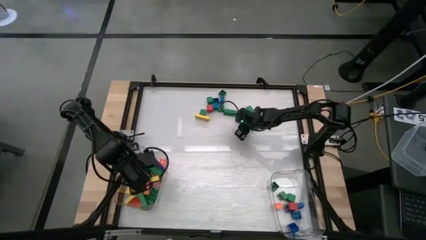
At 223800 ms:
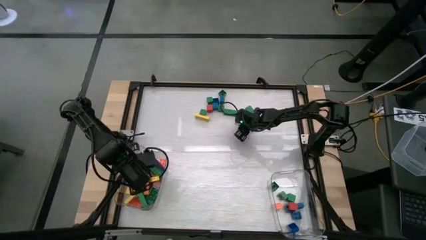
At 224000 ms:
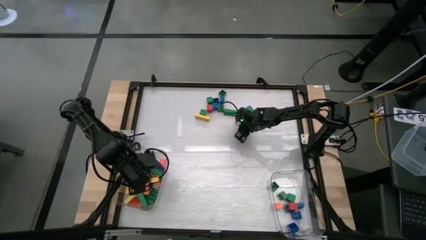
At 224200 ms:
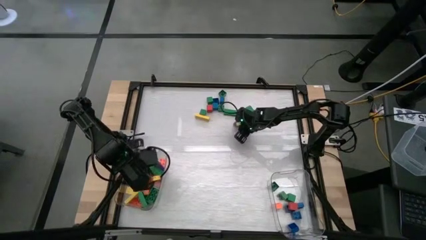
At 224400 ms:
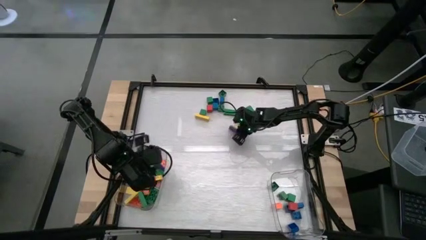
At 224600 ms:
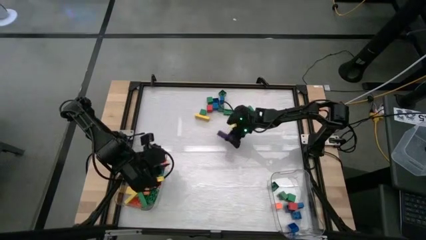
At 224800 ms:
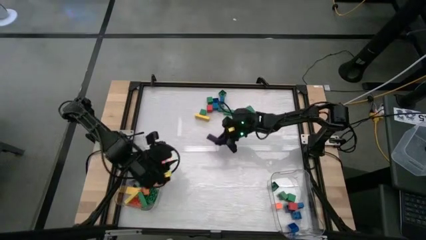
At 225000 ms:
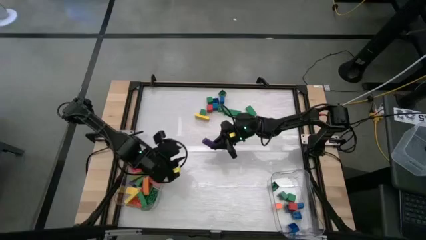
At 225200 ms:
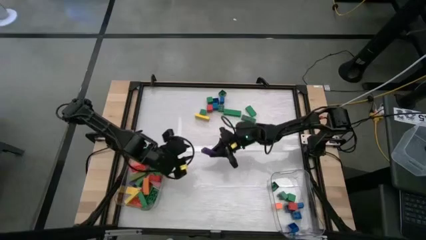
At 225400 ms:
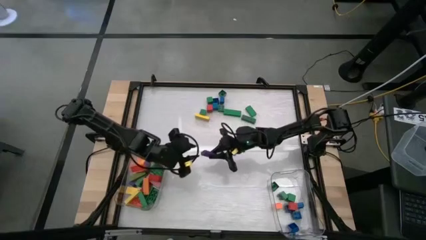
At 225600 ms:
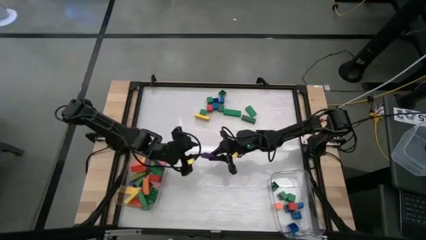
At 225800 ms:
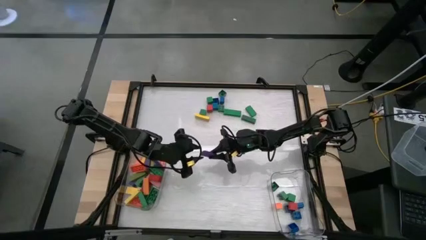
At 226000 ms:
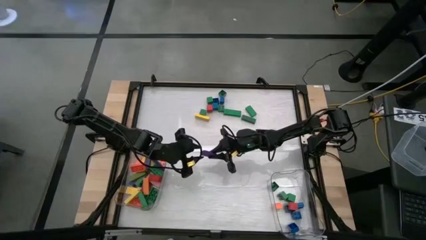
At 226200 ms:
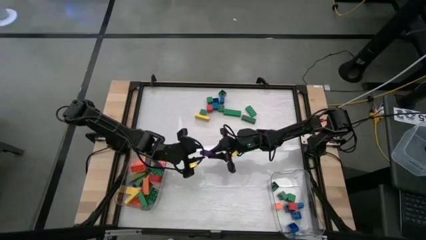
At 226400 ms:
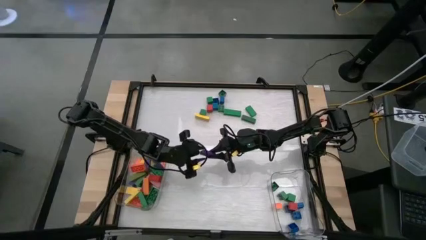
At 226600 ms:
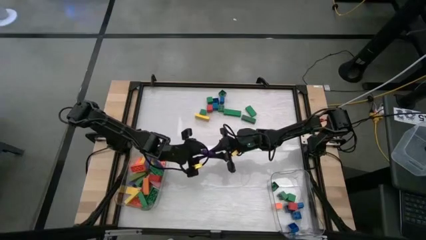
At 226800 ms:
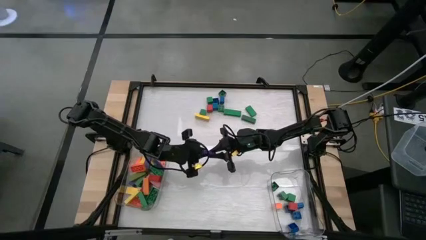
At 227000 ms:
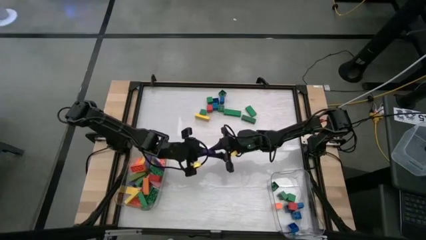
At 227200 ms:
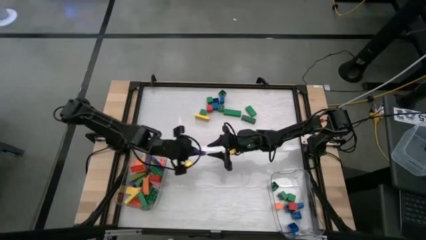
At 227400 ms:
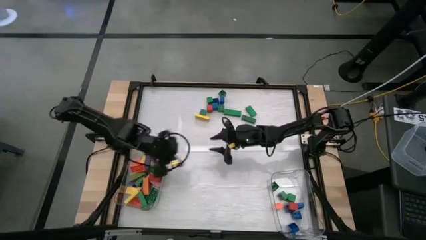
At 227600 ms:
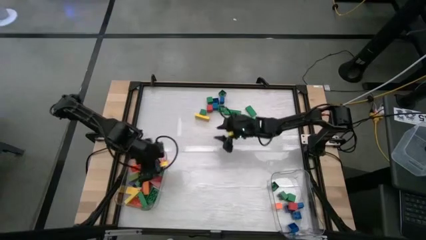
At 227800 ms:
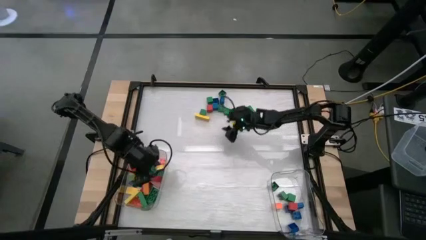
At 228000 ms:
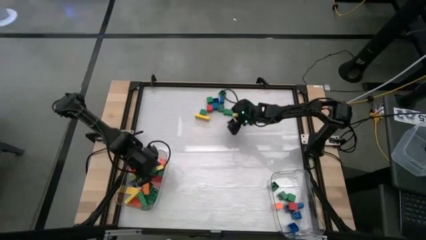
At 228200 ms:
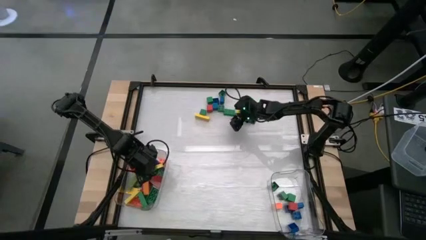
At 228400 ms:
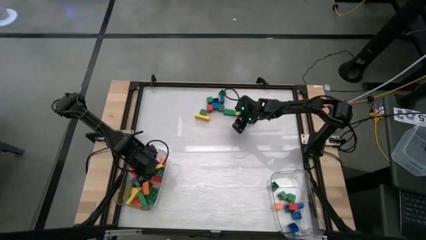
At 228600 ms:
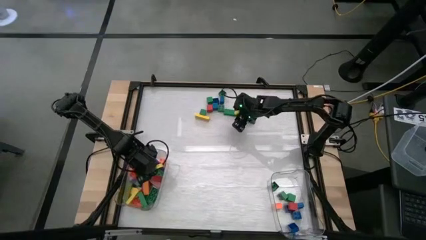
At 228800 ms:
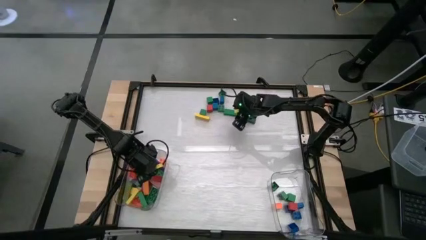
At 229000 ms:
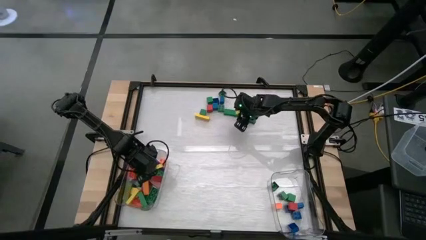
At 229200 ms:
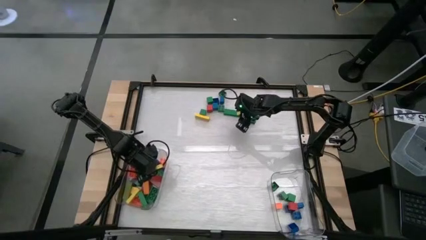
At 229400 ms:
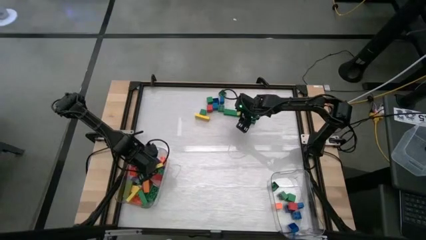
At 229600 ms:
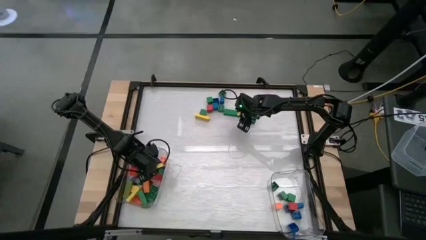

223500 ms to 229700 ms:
Task: Sort blocks by size
Put the large violet wooden block into the left transparent bin

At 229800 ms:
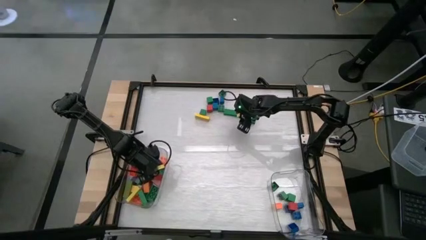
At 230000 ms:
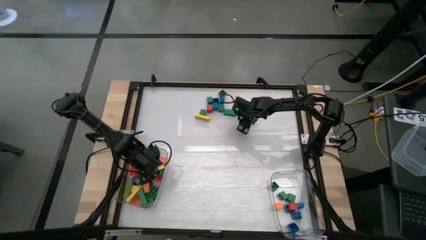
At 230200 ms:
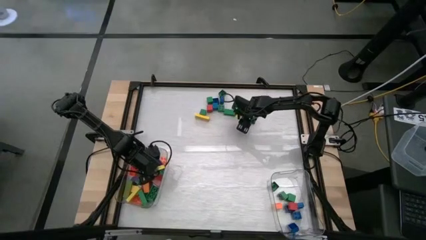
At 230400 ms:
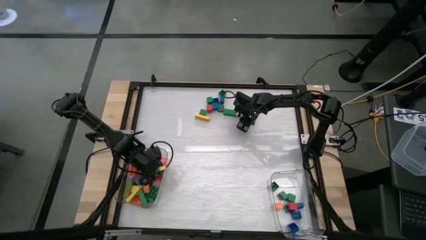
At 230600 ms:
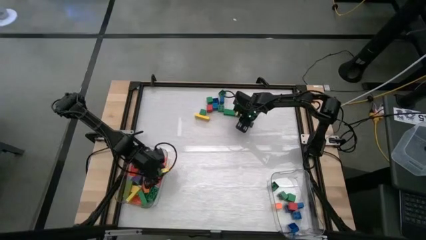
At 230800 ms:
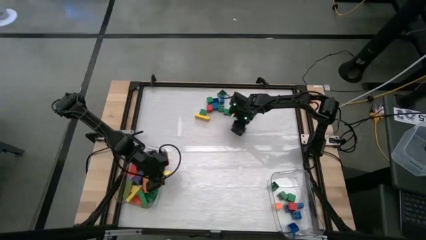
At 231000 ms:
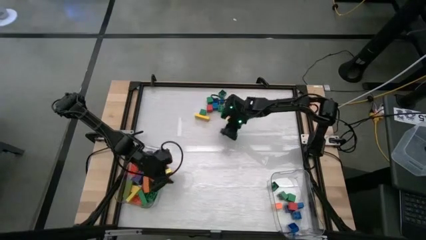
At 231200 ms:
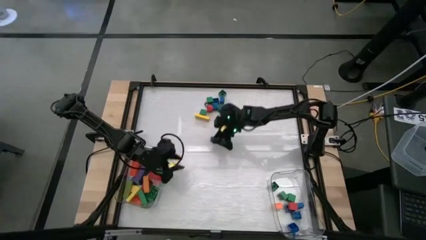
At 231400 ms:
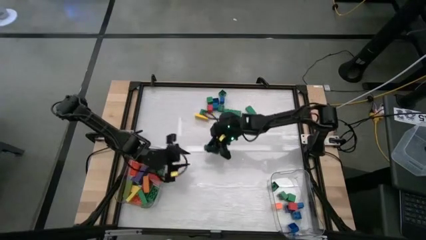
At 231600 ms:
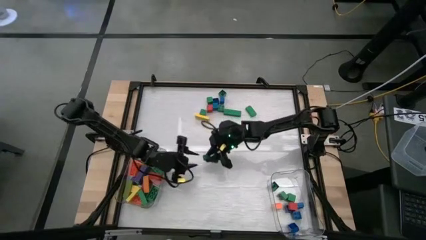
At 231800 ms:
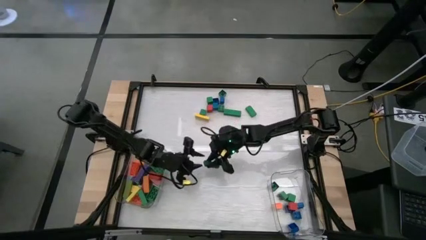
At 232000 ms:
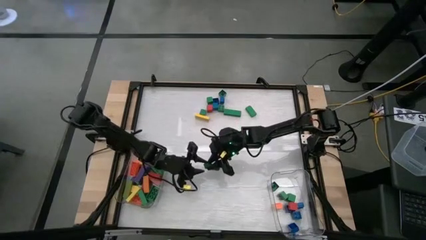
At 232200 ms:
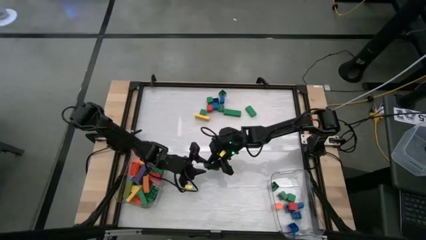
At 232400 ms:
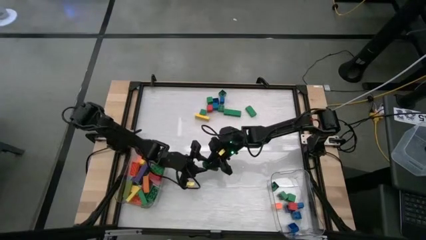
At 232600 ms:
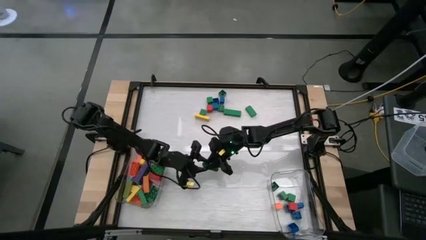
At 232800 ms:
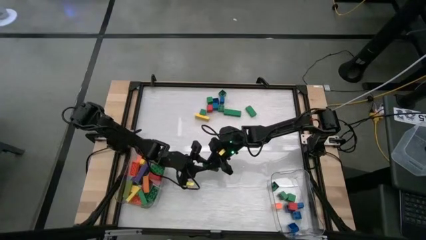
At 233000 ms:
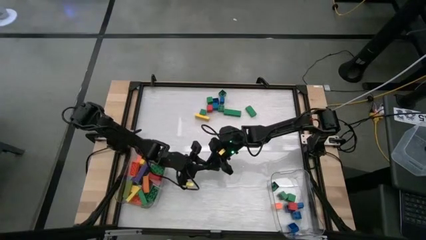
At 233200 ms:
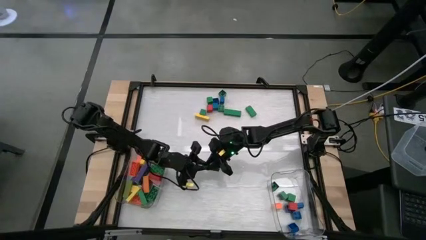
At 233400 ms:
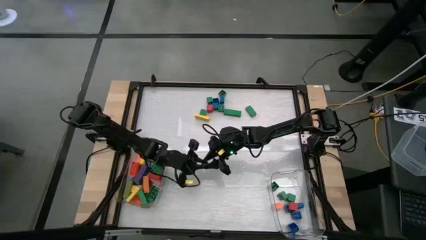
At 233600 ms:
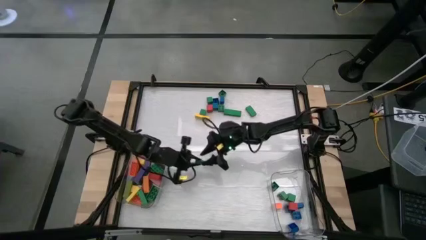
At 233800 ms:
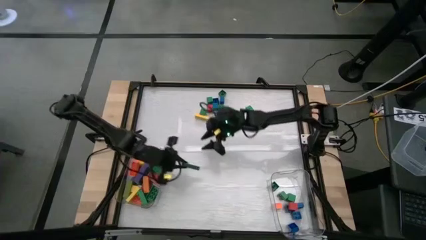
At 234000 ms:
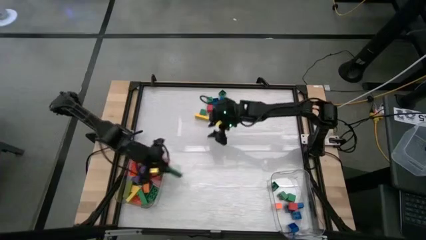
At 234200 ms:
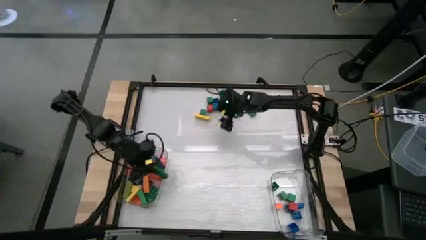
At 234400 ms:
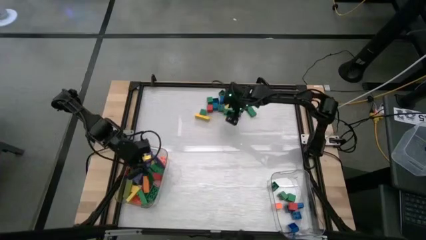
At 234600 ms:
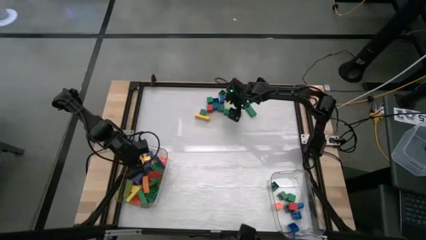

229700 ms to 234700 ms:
Put the large green wooden block into the left transparent bin

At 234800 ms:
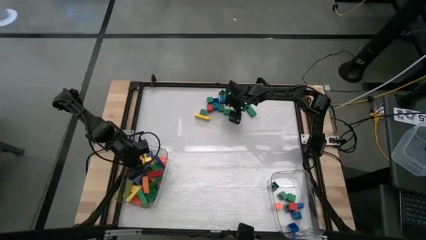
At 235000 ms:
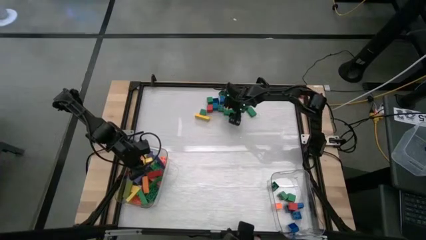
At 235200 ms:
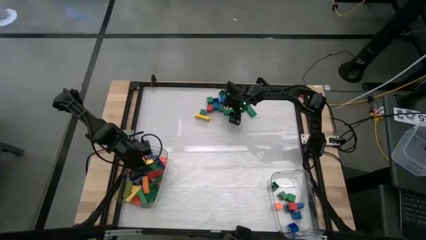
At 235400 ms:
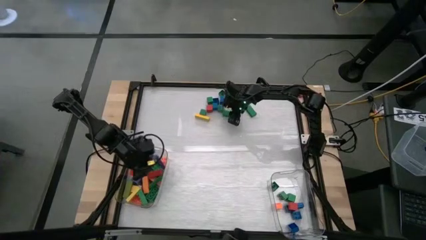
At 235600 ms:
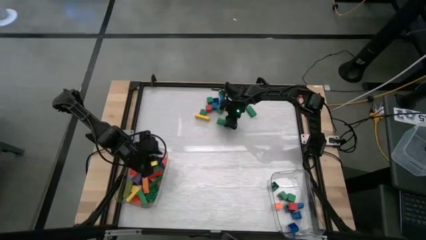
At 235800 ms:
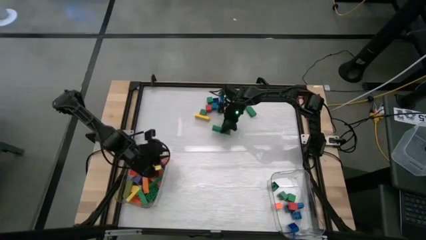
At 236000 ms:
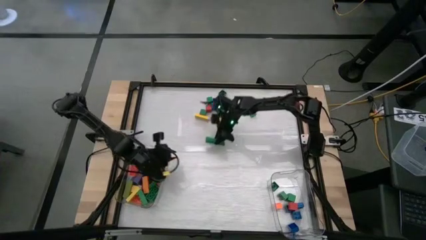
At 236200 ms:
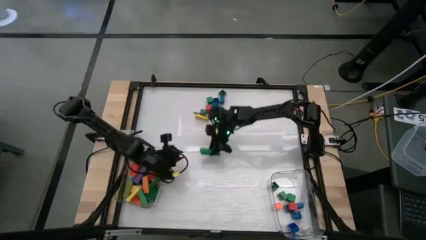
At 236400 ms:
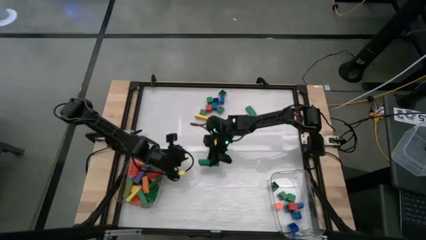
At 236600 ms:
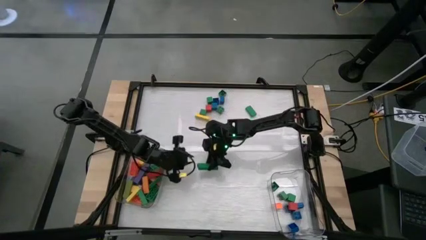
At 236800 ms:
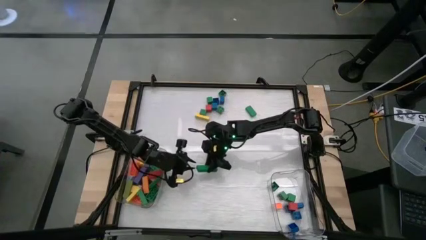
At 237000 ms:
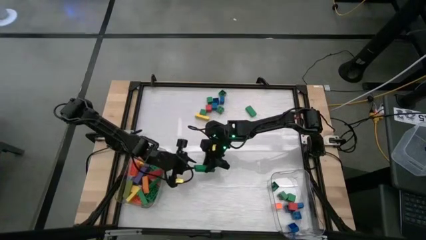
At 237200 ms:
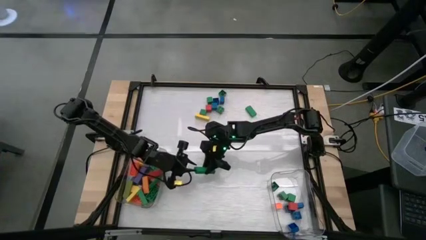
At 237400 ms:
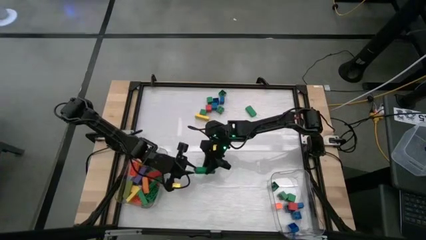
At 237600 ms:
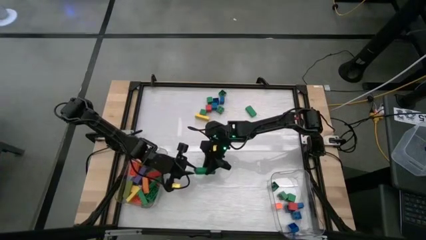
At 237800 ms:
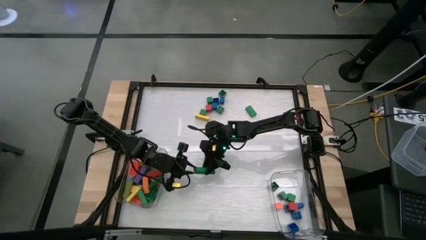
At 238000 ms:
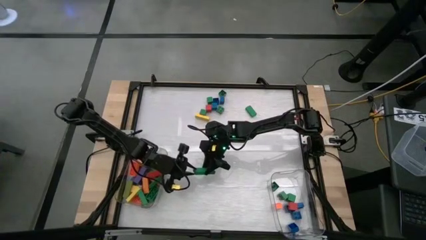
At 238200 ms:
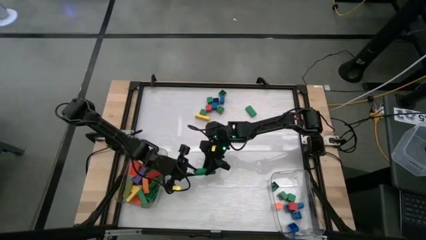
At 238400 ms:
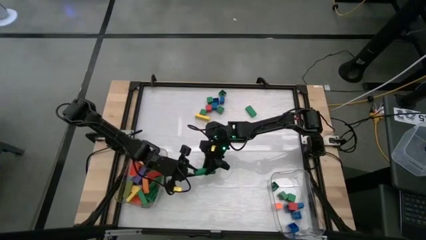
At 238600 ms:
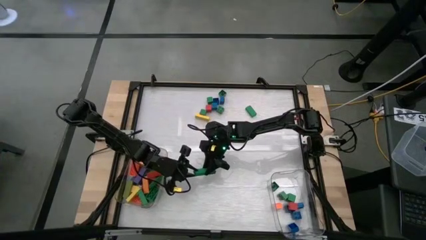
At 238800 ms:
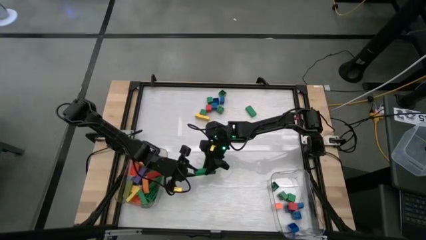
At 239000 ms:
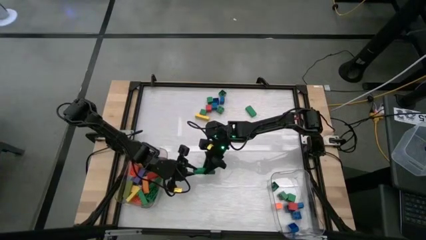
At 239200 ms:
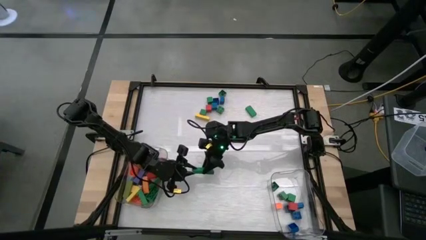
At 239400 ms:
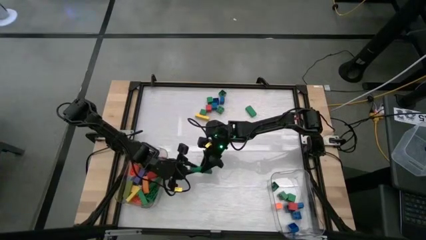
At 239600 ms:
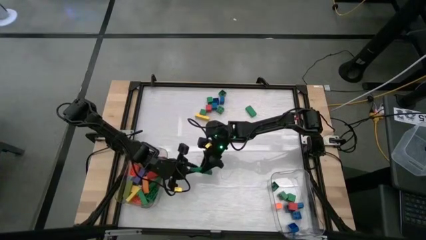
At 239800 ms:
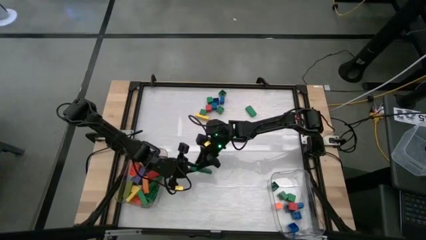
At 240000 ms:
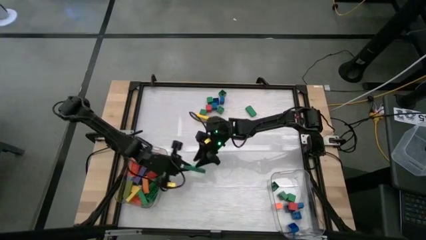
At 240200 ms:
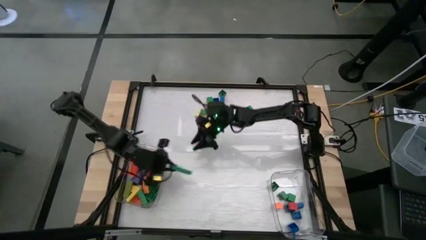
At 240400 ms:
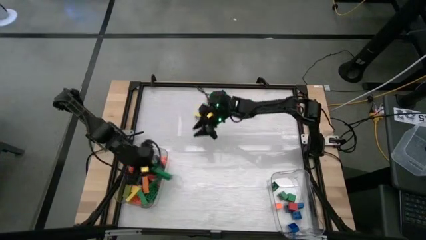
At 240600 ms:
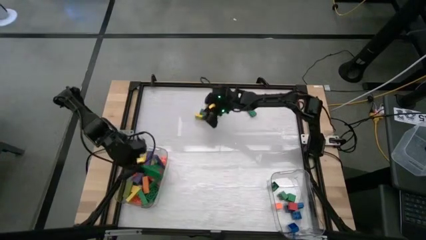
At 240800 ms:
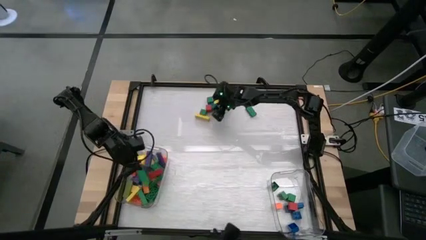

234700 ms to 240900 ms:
Put the large green wooden block into the left transparent bin
